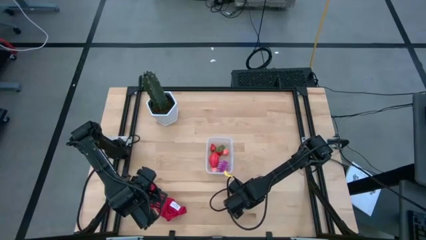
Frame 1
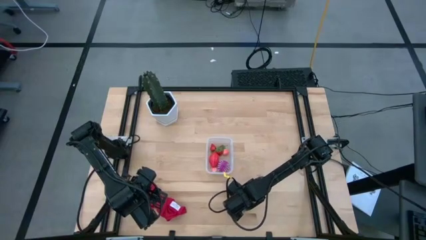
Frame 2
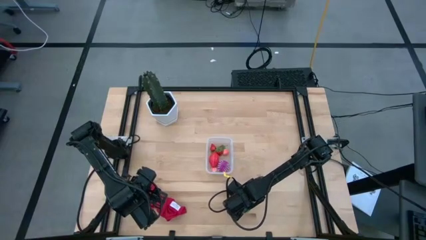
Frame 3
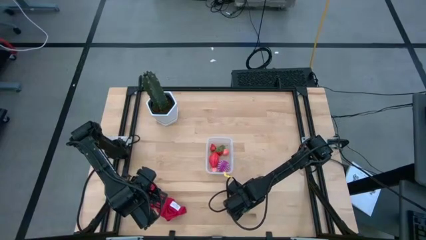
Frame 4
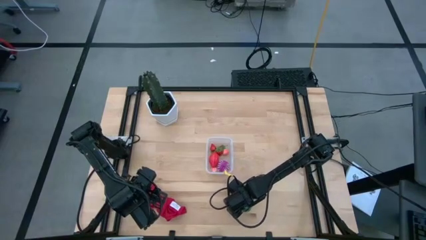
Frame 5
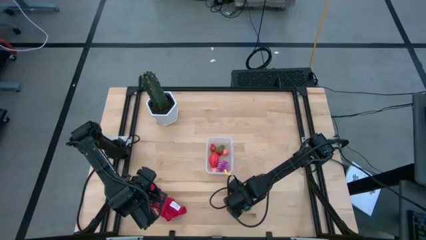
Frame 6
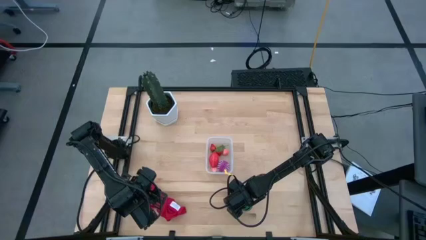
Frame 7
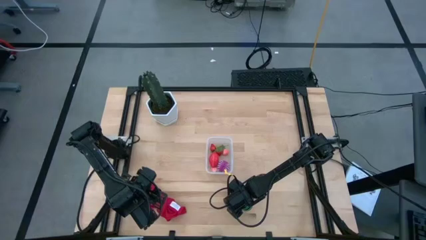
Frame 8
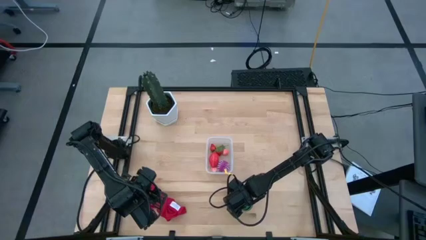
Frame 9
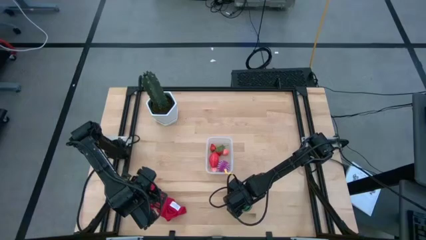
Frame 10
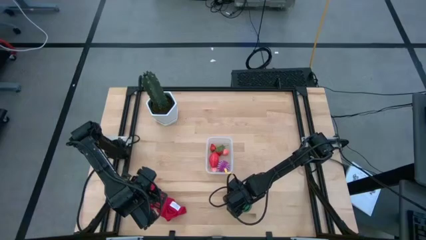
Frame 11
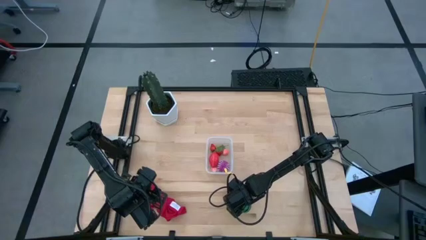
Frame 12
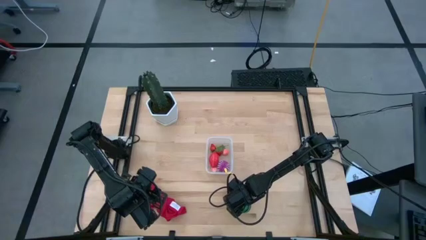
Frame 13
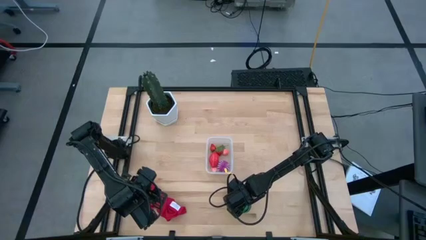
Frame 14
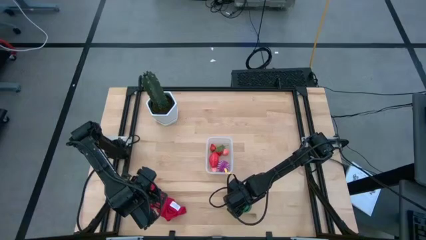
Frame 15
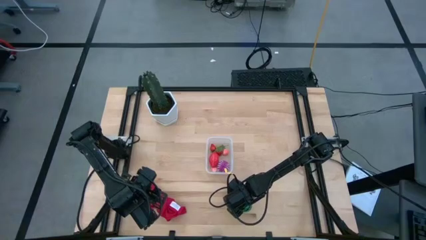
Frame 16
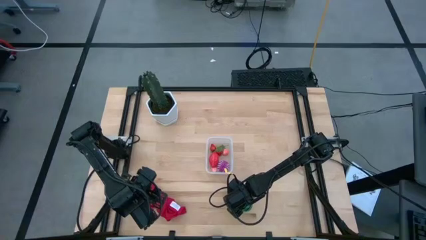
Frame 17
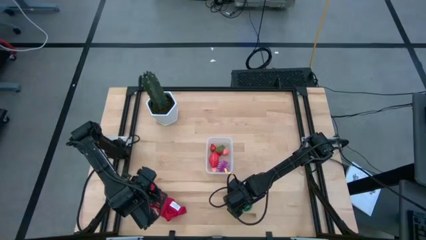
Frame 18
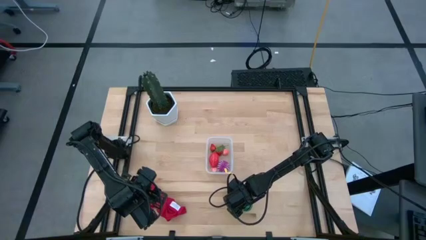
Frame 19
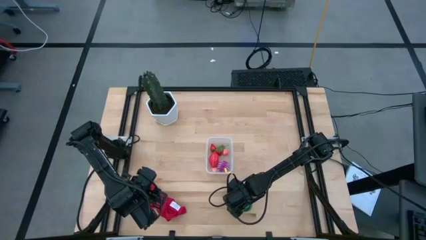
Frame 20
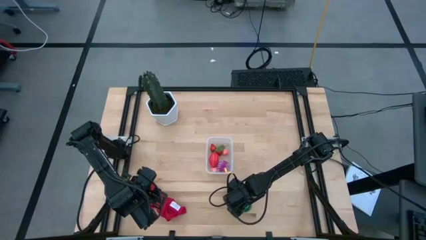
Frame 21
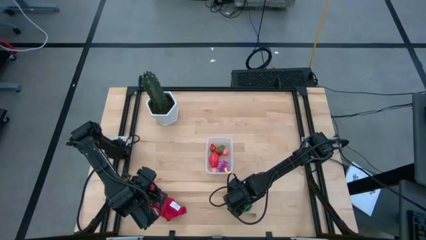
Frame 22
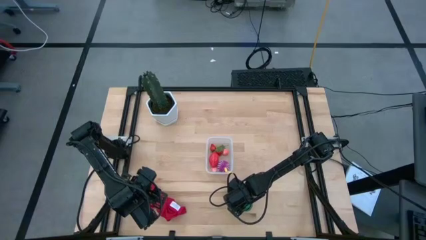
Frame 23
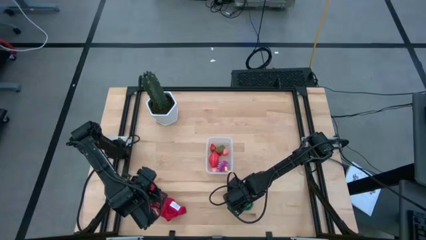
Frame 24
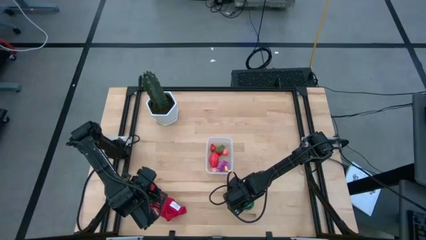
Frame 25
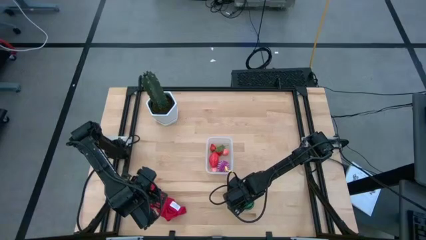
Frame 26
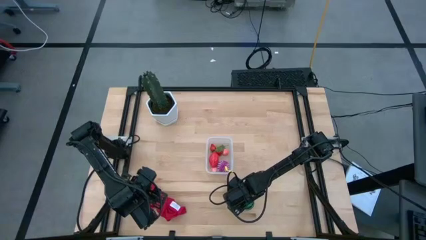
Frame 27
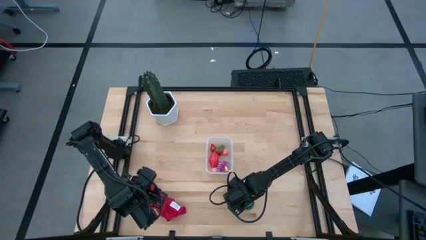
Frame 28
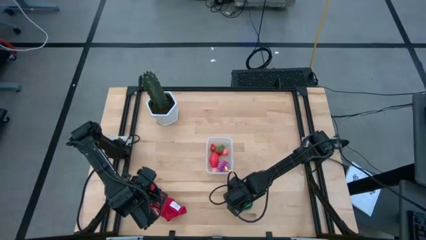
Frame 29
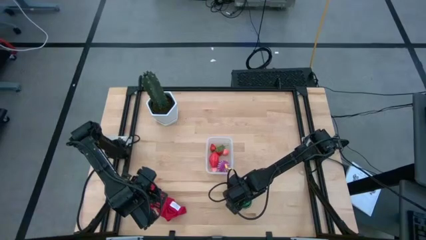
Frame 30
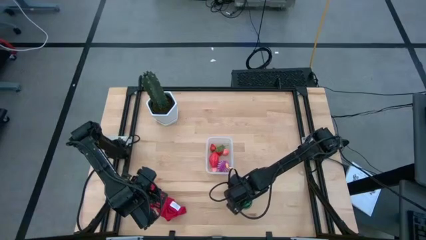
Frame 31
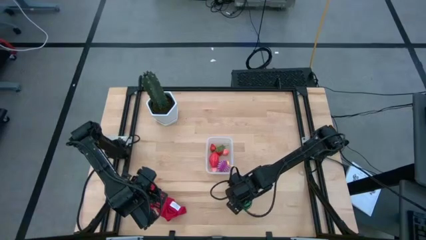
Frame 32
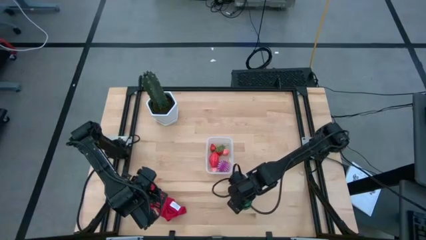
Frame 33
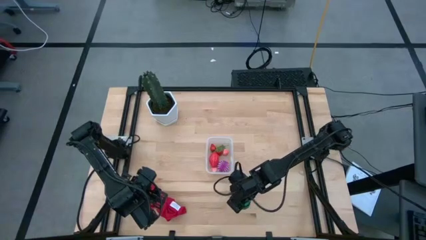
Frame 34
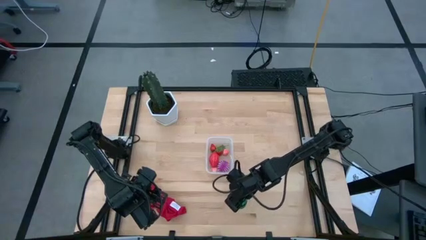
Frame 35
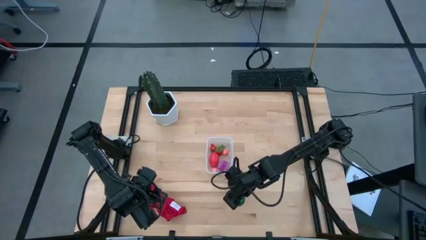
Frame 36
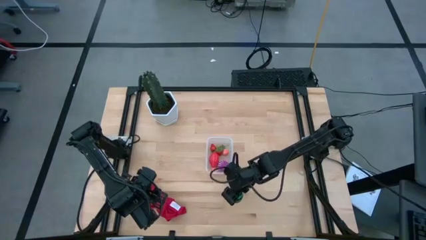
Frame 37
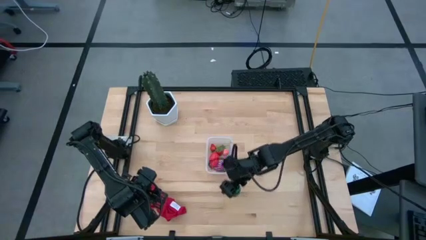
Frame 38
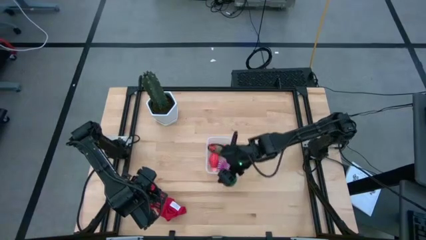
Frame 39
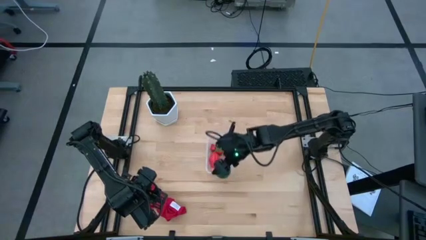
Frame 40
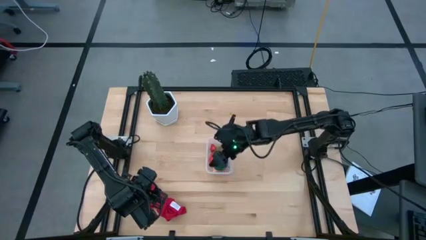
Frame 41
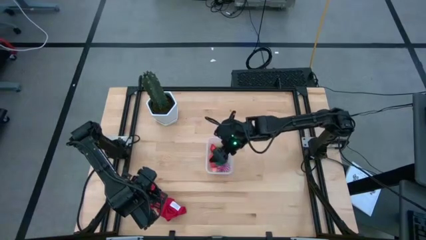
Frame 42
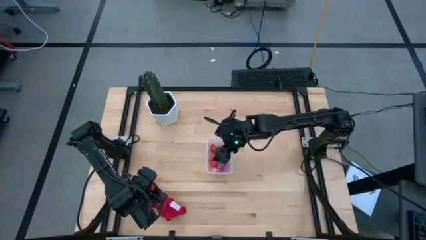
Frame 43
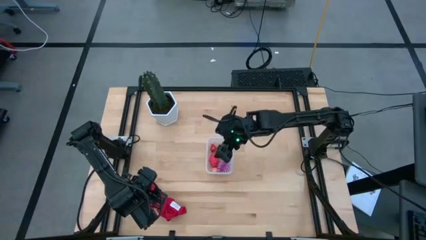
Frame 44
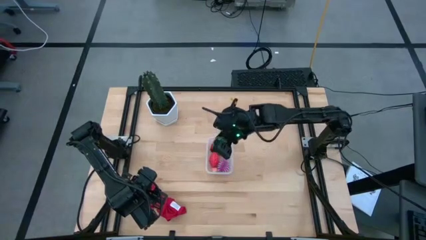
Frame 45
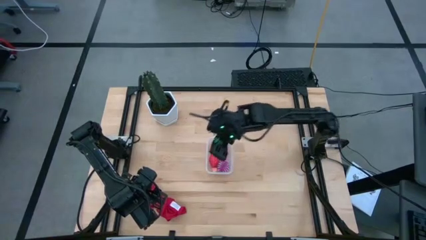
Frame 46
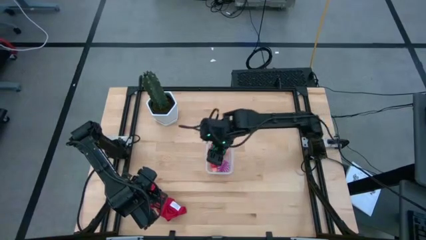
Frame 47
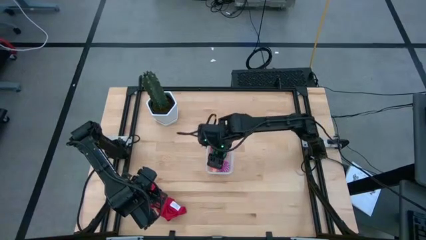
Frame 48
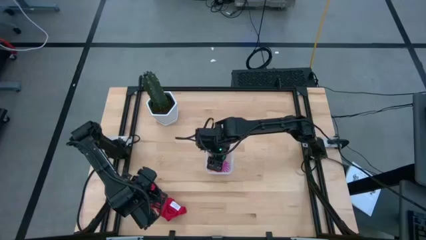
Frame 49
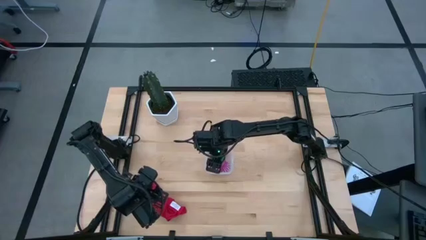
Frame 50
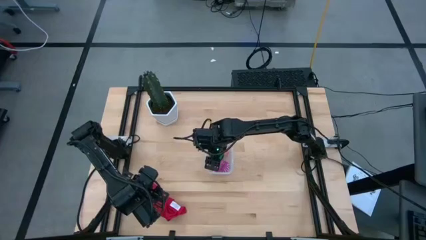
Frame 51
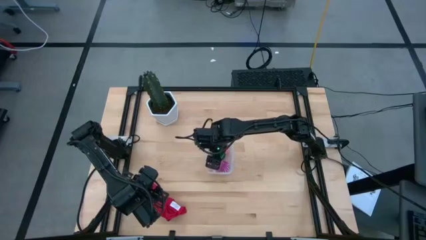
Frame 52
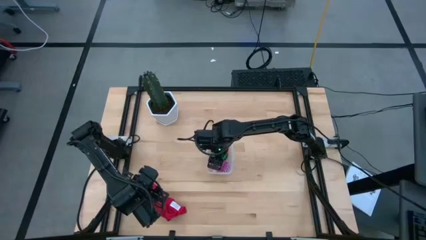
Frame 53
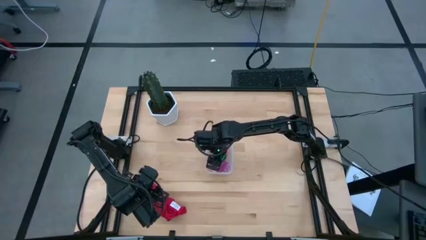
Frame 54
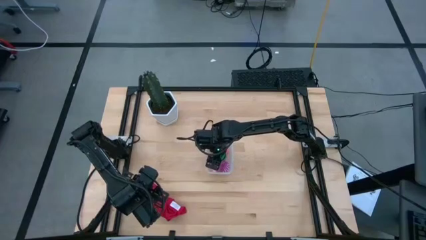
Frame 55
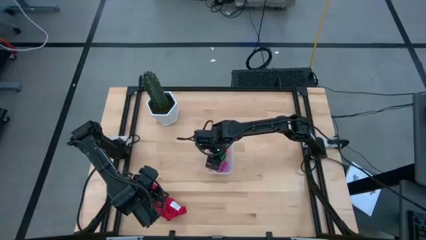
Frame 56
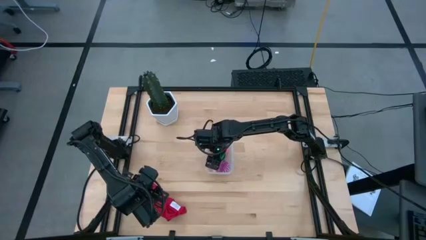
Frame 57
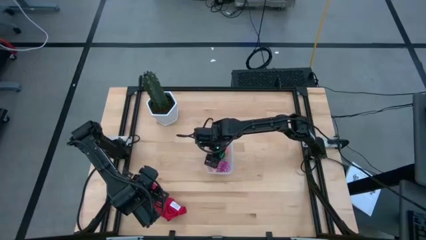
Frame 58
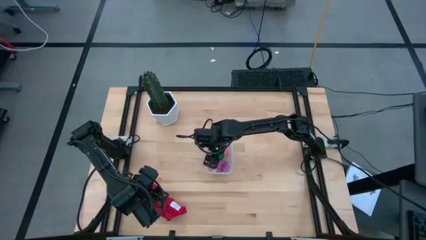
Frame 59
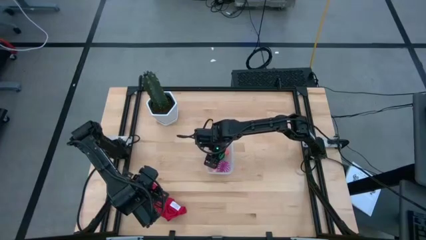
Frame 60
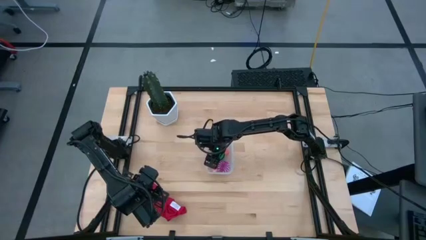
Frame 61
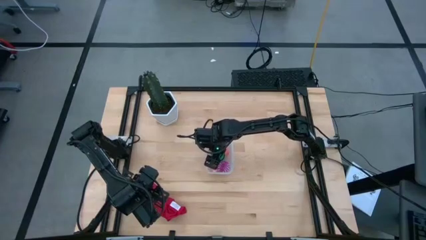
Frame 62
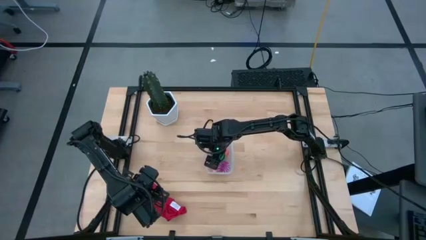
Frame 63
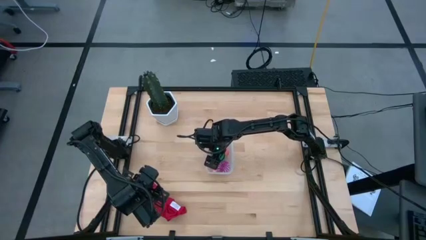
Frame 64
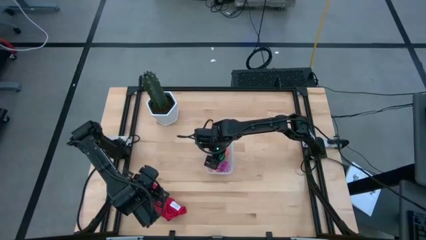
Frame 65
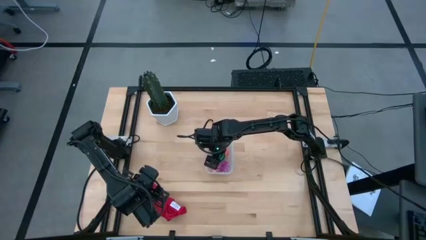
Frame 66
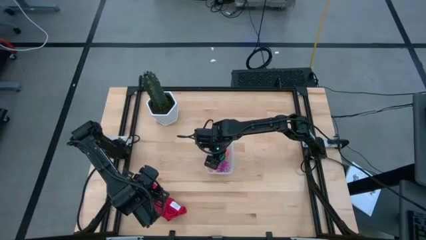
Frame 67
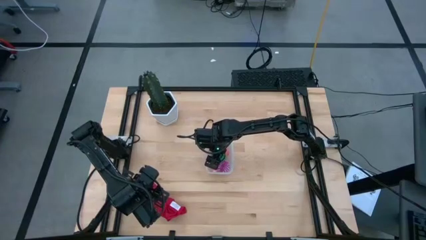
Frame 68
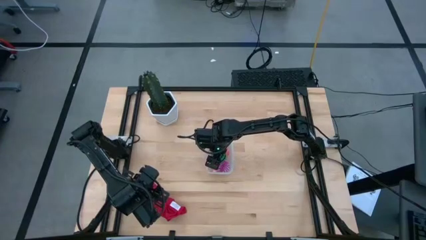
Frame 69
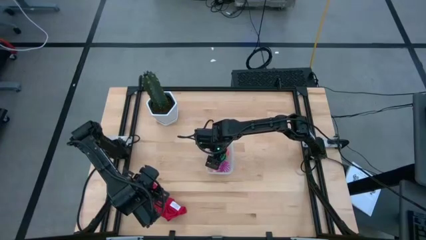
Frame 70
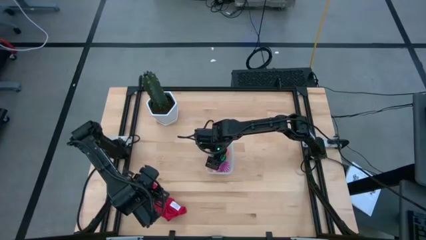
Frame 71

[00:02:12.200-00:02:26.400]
Task: Pick and placing Produce into tupperware
Put the green watermelon into the transparent bin

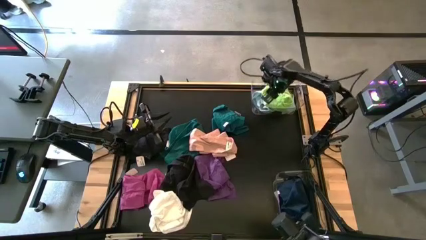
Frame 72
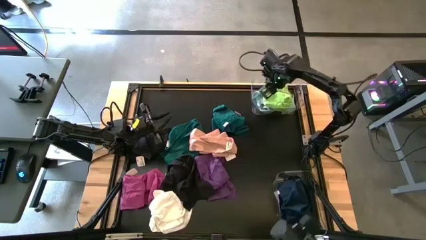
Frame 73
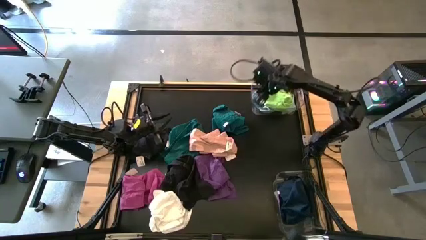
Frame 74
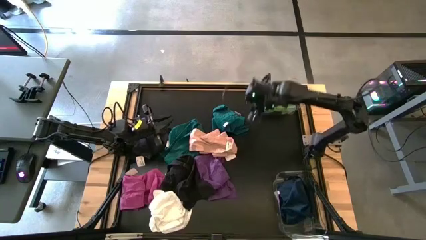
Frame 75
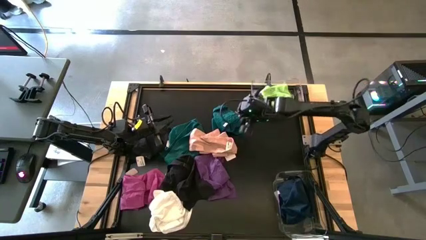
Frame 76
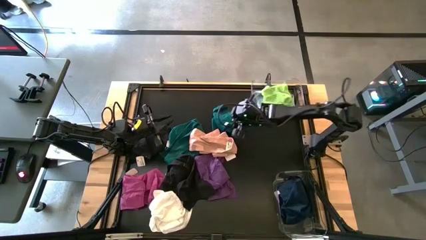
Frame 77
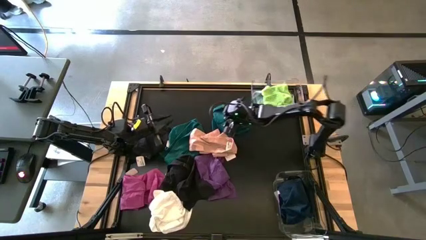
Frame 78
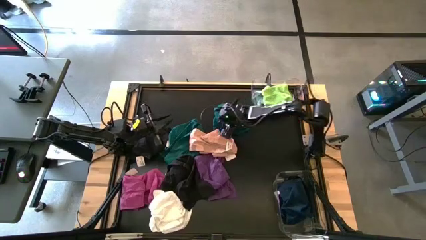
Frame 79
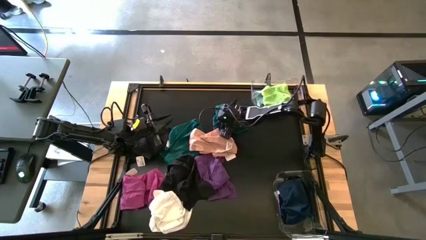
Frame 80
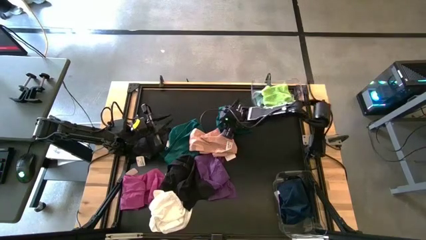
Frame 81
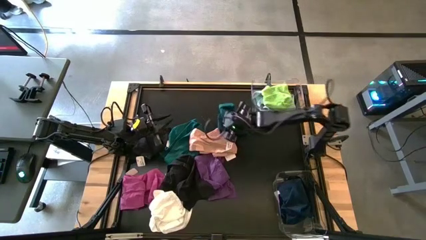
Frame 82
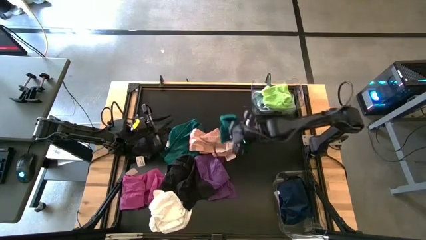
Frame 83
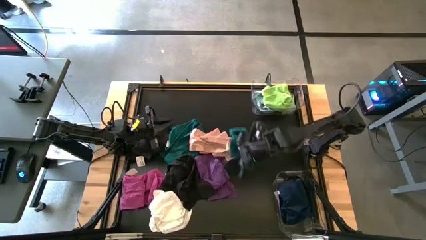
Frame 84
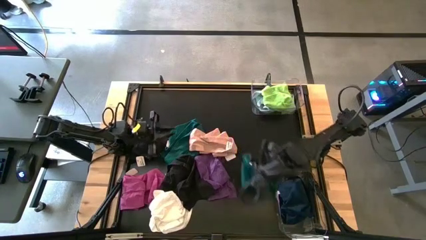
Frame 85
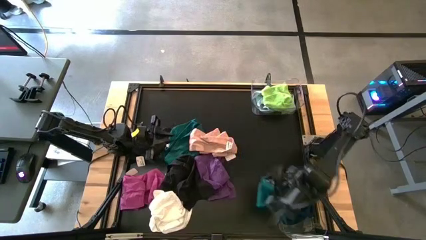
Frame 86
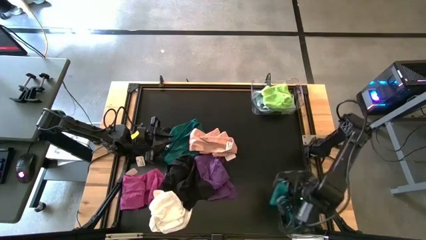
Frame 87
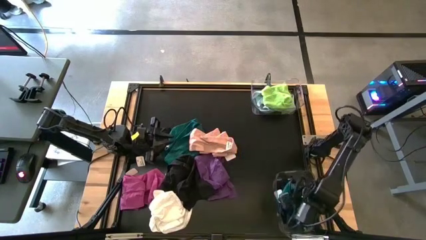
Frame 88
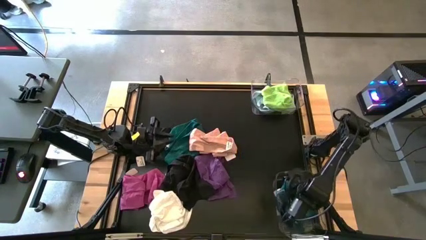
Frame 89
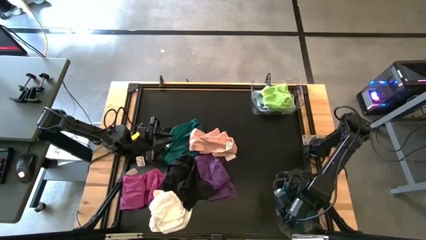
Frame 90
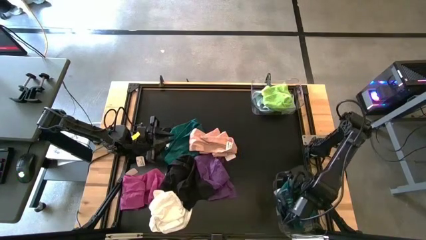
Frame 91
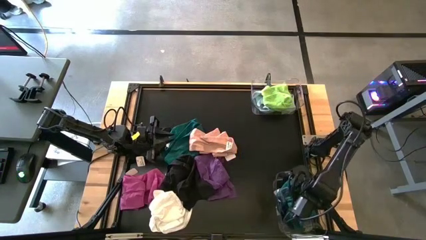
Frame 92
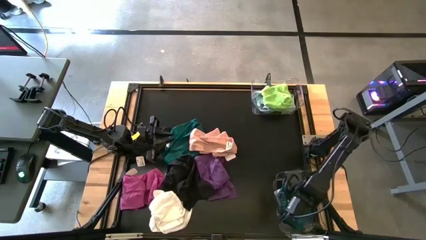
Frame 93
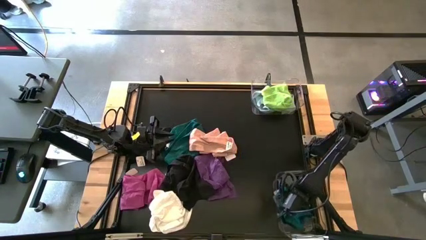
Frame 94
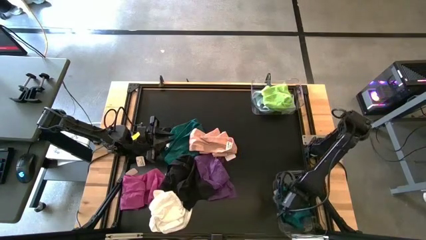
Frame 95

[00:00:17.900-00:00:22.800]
Task: Sort towels by color in basket
Put the right dark green towel into the bottom transparent bin
